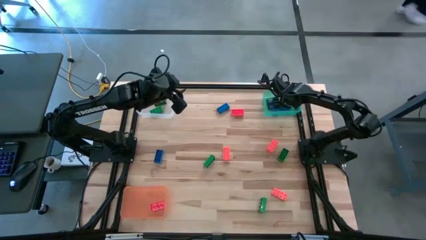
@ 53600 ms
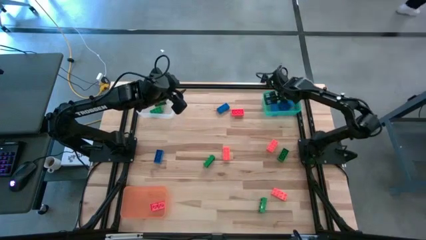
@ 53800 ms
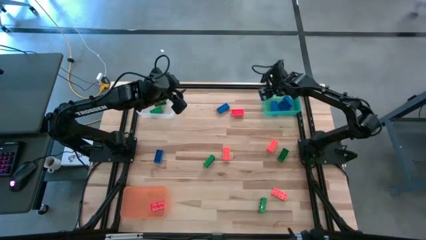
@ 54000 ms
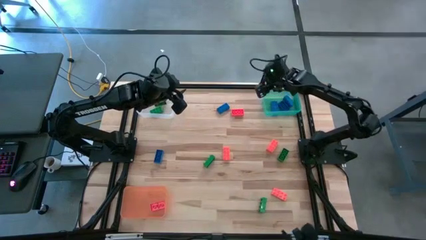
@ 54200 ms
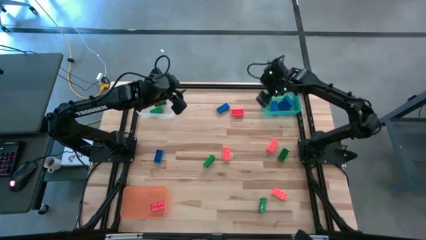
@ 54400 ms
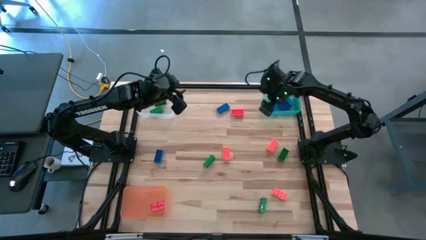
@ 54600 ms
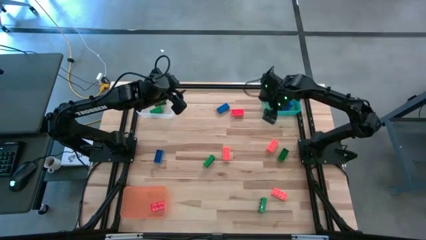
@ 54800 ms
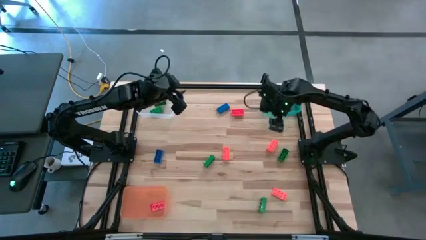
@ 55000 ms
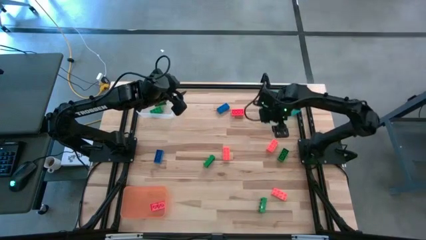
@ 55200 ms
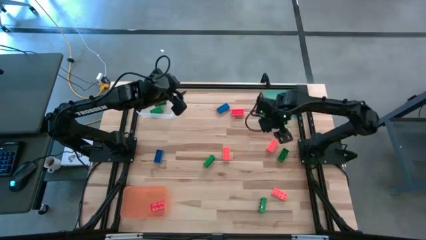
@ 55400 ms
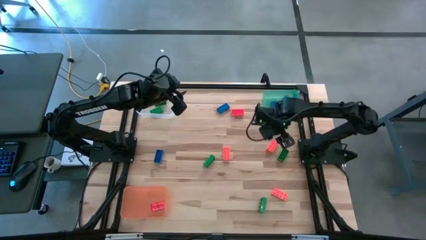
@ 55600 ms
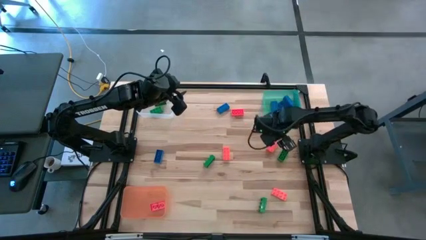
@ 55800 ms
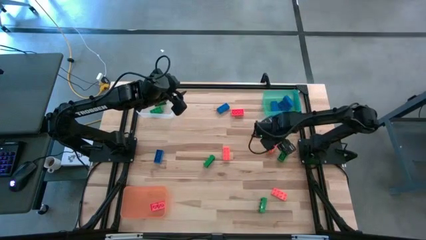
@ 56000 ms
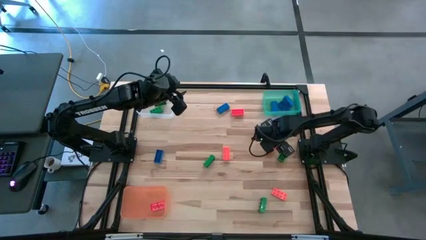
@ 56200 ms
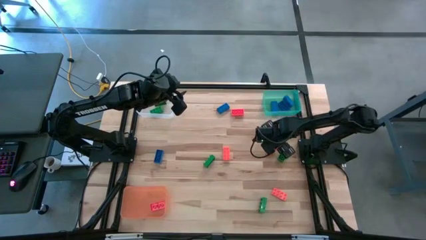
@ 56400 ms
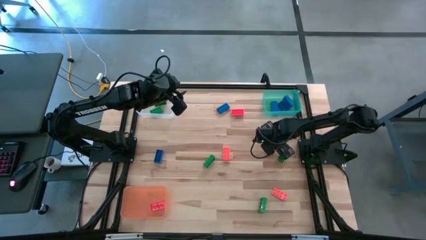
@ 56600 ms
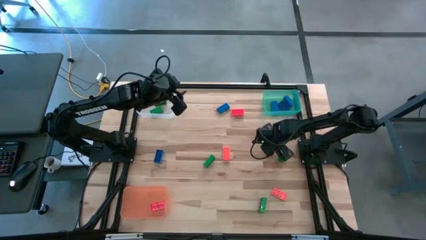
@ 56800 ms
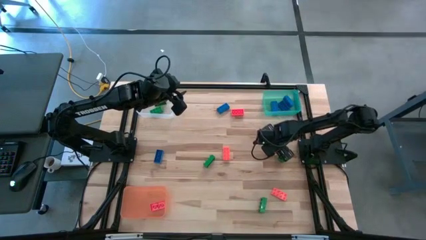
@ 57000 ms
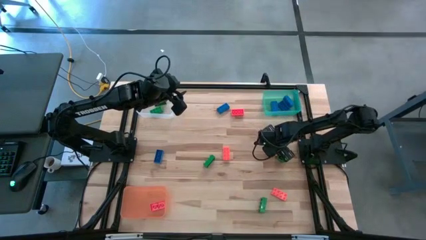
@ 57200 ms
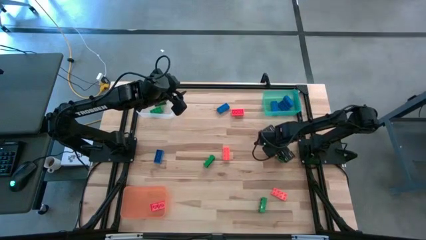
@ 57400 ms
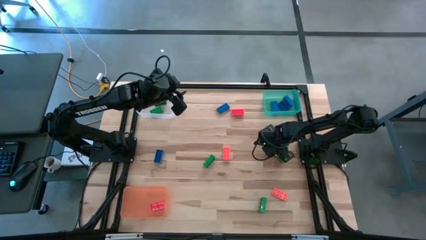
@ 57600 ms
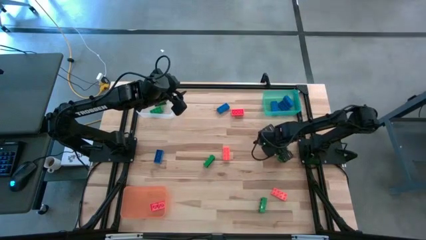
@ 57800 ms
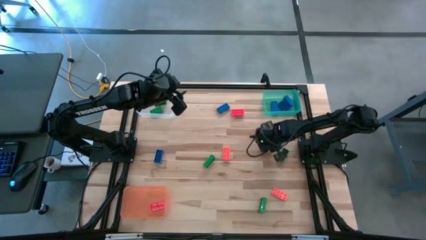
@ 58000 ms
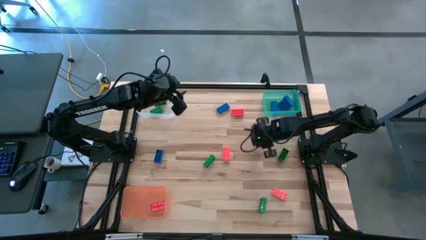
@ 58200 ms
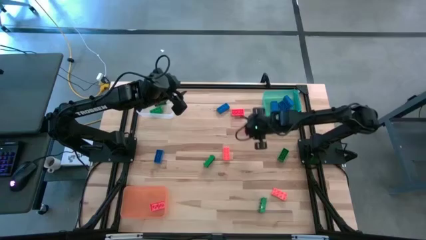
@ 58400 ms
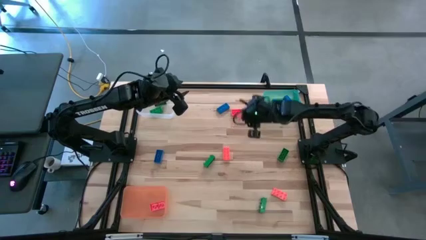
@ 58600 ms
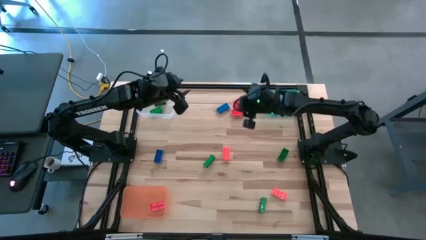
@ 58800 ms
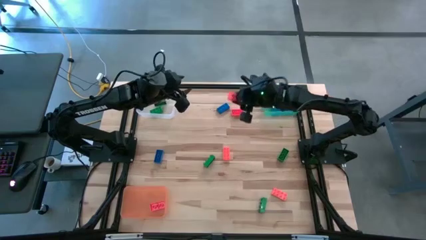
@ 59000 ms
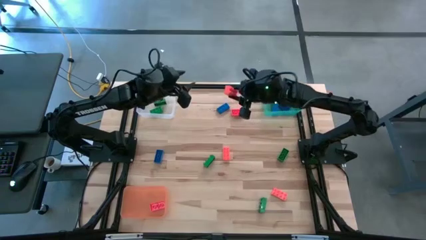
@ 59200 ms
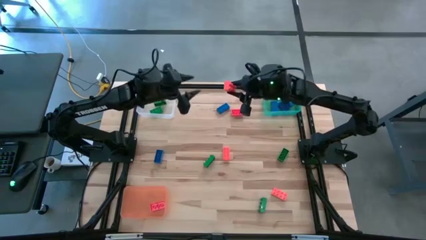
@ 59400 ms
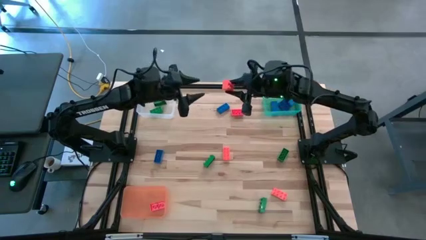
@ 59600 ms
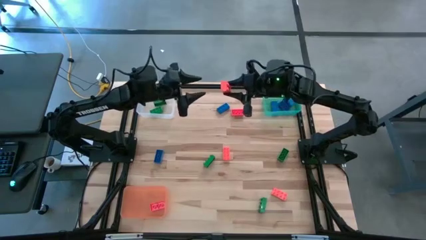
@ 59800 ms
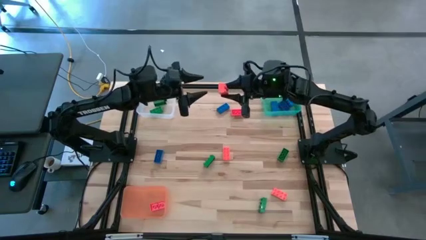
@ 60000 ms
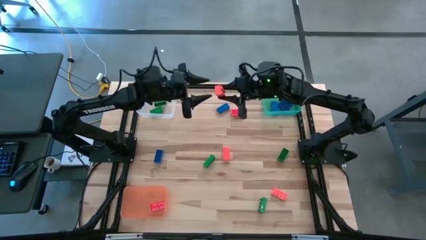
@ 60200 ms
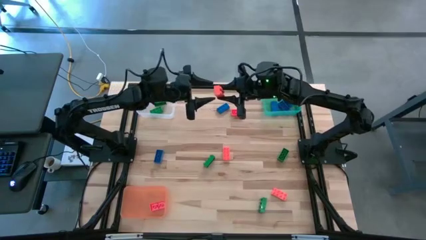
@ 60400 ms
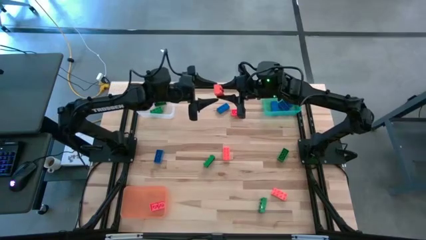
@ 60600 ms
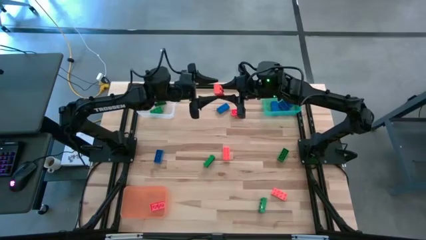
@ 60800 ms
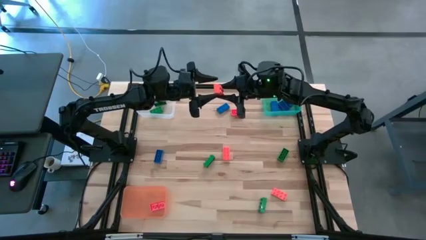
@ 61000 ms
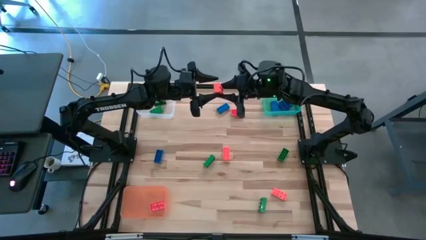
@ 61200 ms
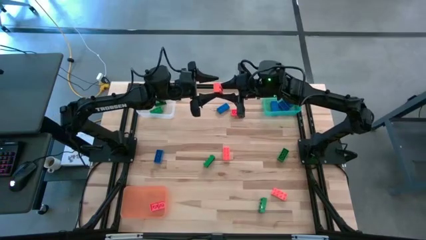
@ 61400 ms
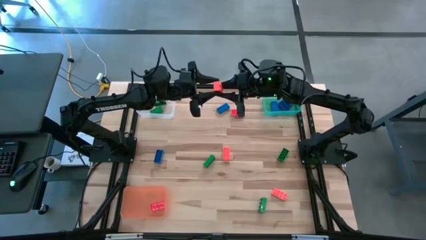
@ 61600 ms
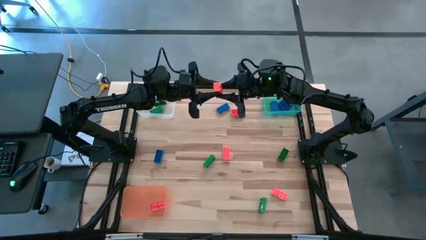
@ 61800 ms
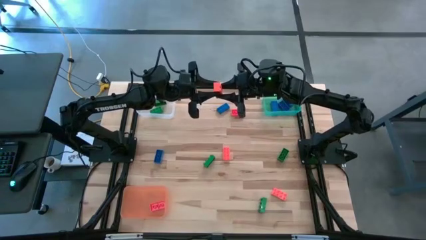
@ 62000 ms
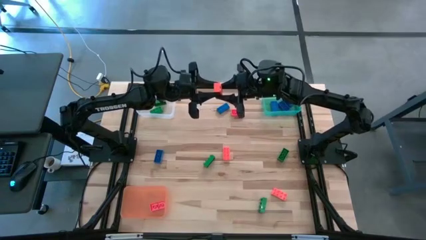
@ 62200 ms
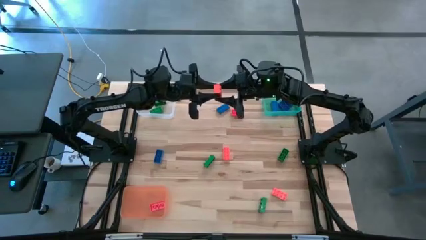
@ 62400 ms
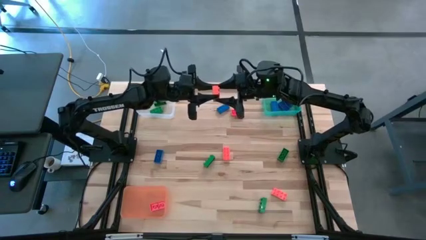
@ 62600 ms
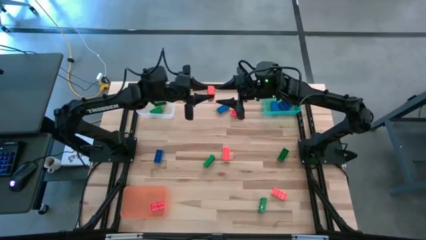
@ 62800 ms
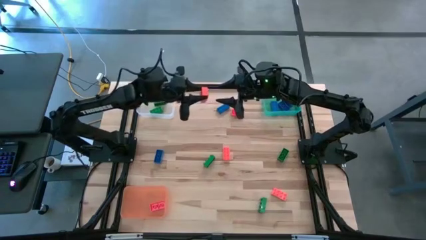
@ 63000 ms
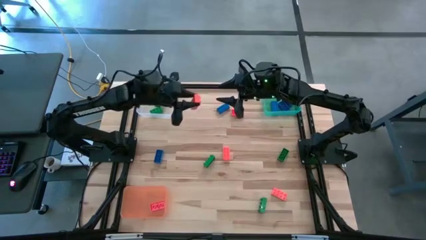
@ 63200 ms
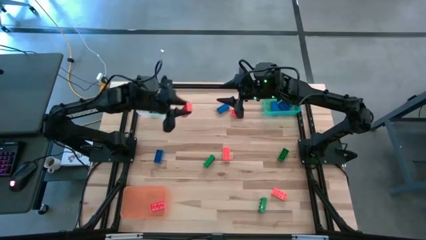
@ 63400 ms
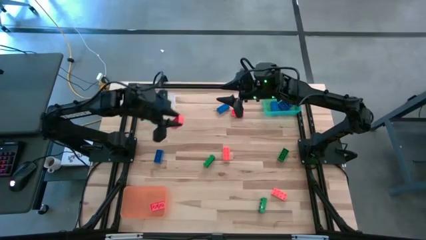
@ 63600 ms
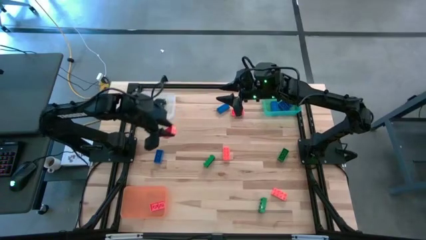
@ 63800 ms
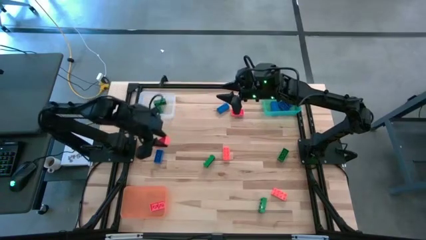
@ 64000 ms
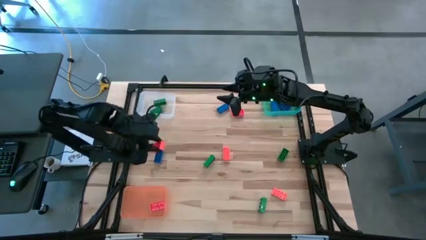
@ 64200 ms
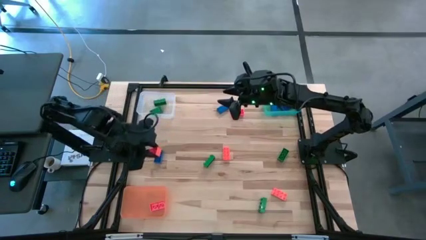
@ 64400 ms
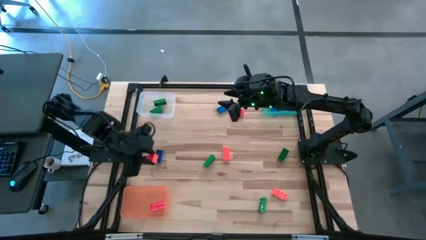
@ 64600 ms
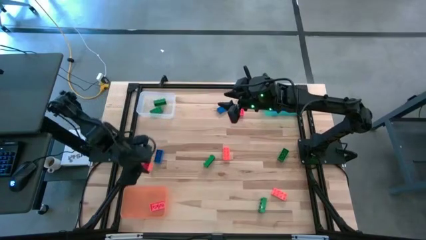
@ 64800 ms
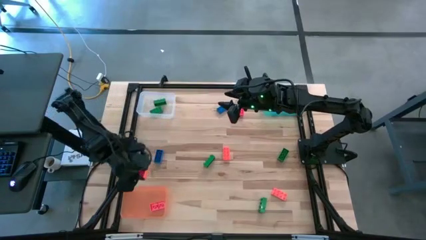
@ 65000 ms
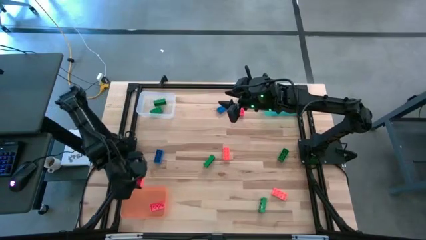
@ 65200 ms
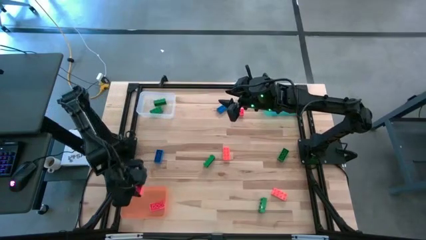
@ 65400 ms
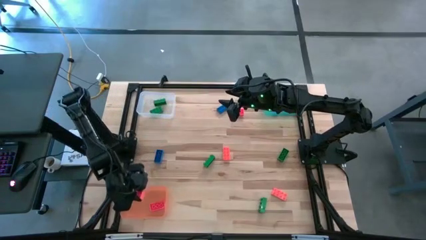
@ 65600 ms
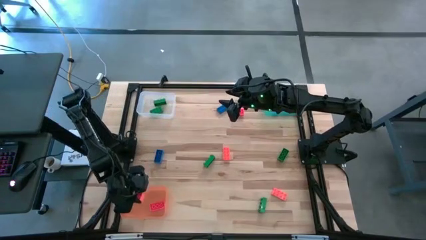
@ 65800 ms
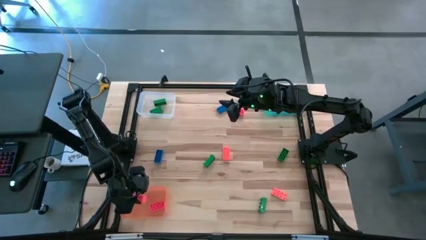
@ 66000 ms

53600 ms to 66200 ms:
Task: Sort & place blocks by color
Put the orange game piece into the orange bin
